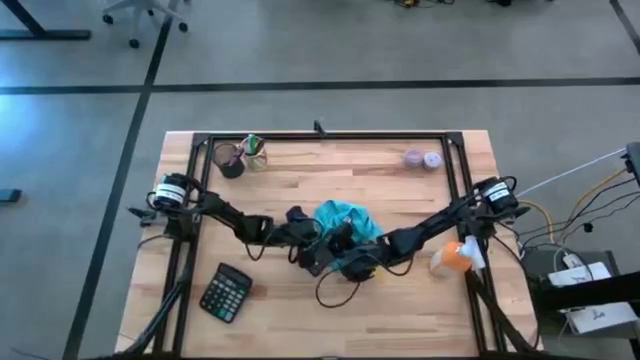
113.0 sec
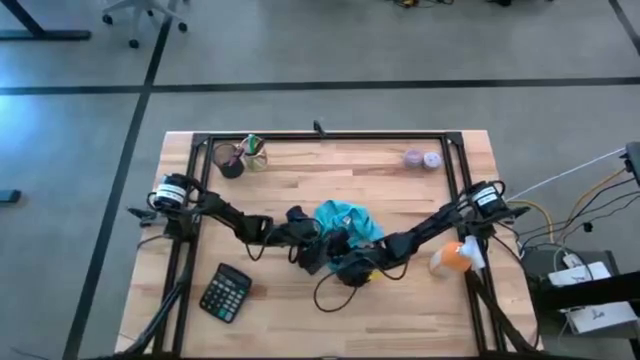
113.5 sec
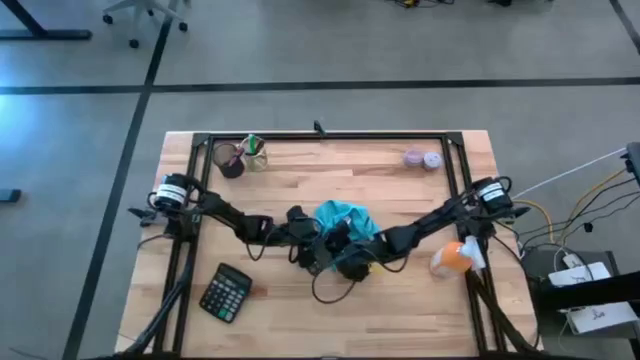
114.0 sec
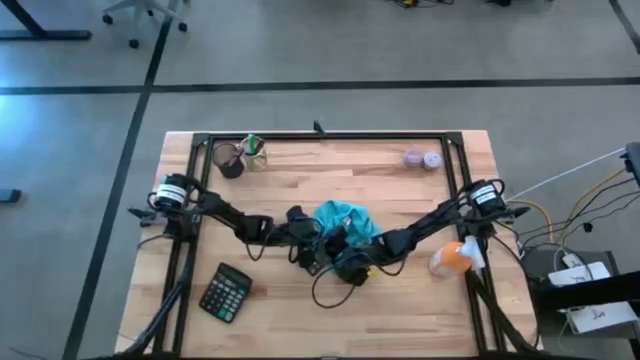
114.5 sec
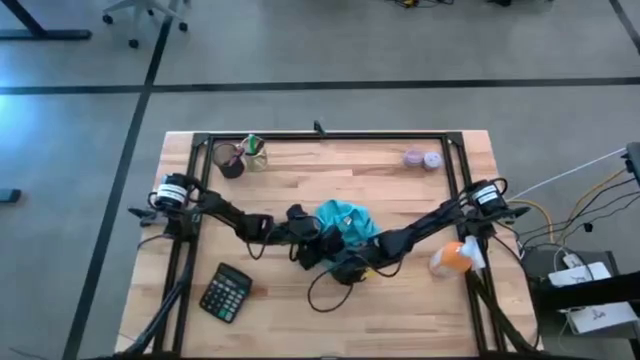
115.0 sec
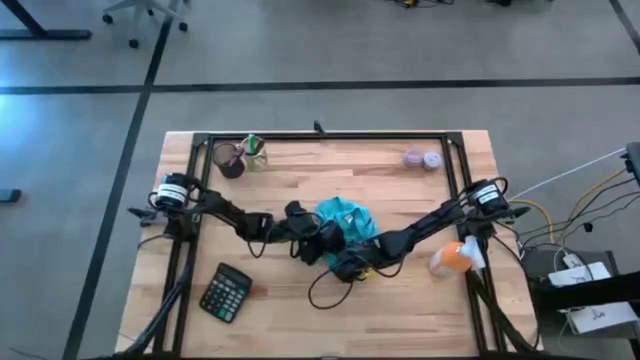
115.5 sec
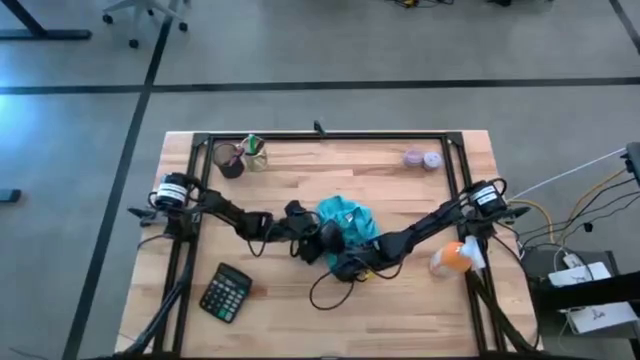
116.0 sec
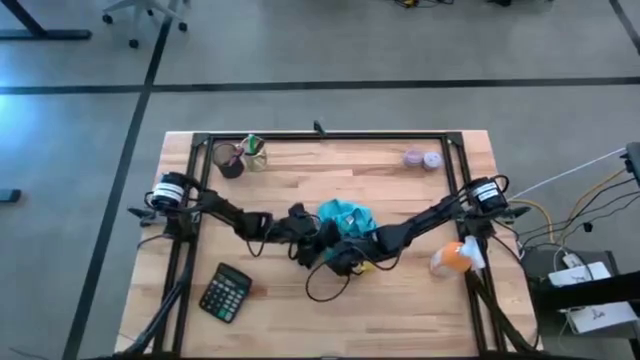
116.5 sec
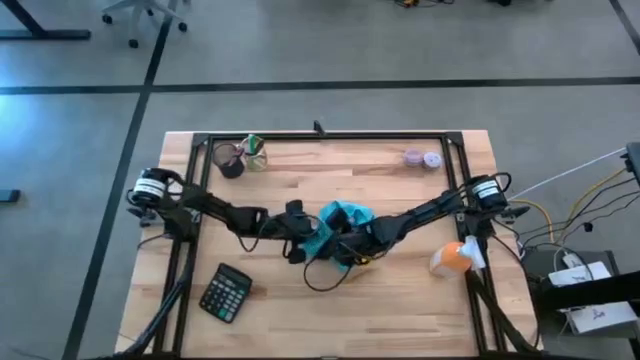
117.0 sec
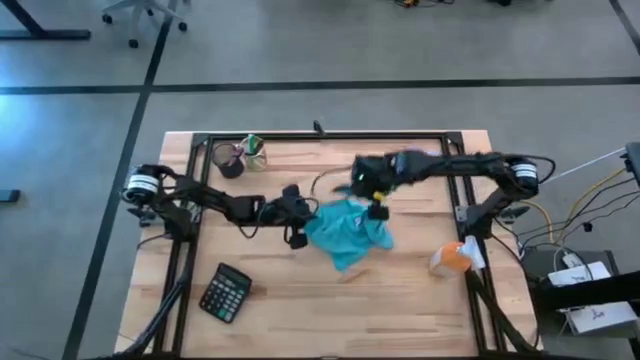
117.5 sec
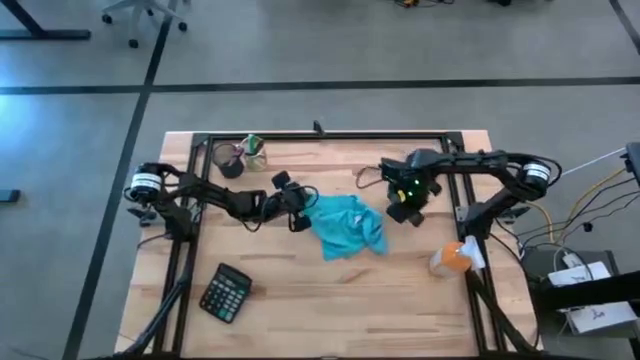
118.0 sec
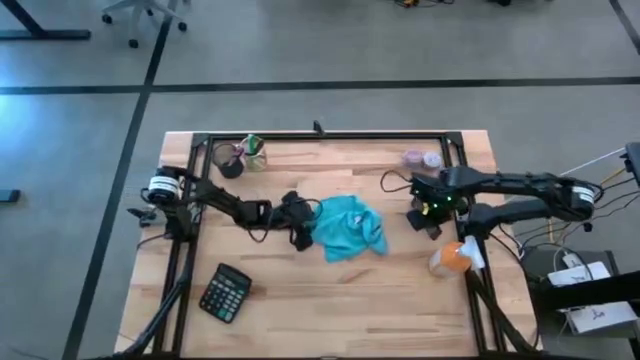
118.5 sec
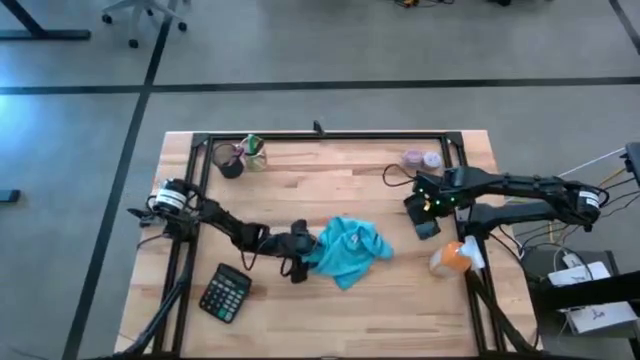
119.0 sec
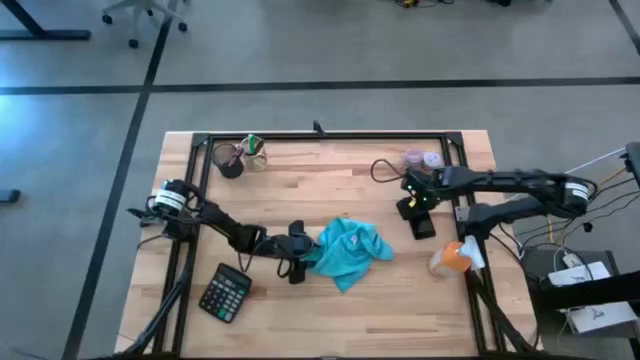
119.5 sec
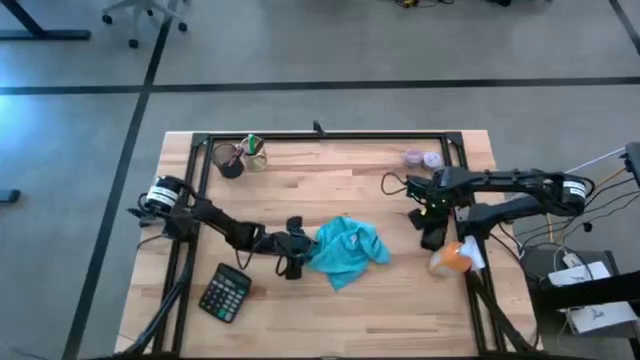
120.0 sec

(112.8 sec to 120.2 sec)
Task: Apply microfiber cloth
Move the cellphone on the middle right on the table

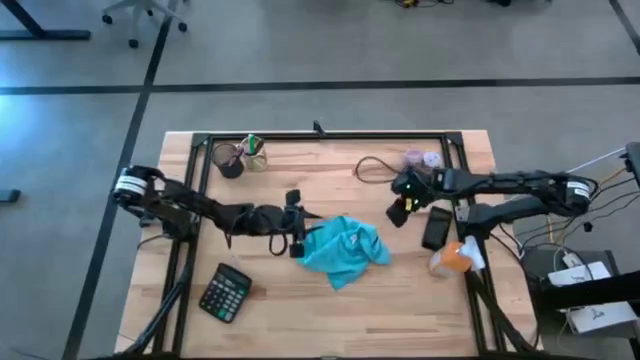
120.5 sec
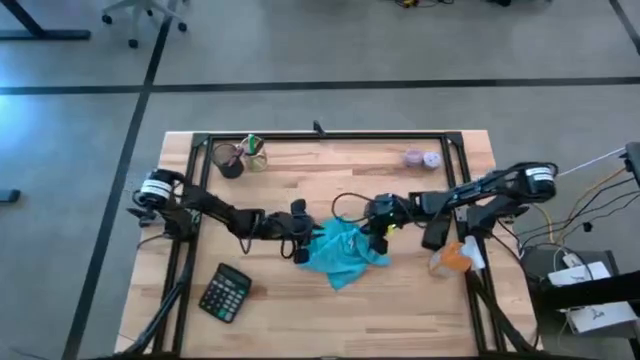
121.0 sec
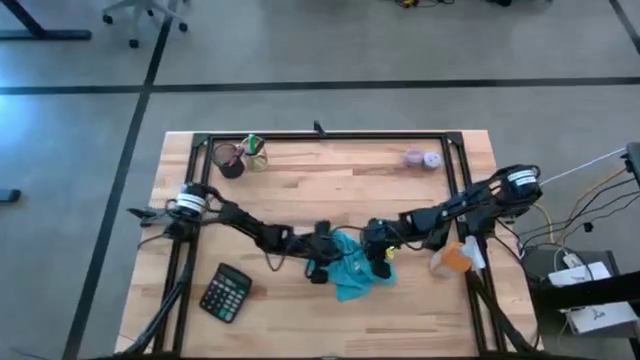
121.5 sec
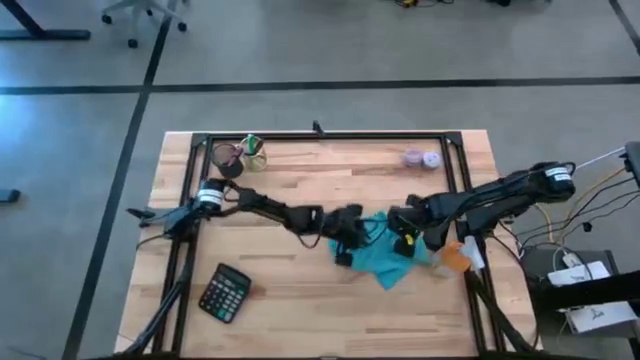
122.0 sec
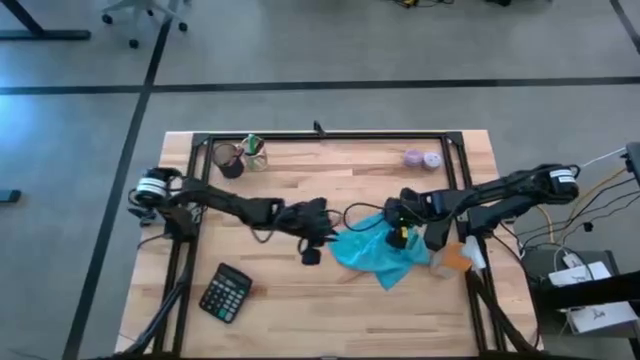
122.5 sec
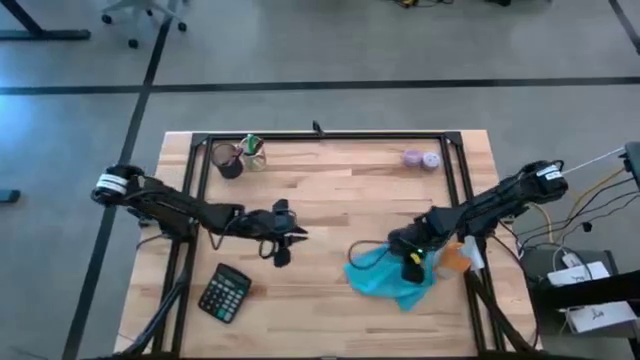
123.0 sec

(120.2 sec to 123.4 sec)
Move the microfiber towel to the middle right of the table

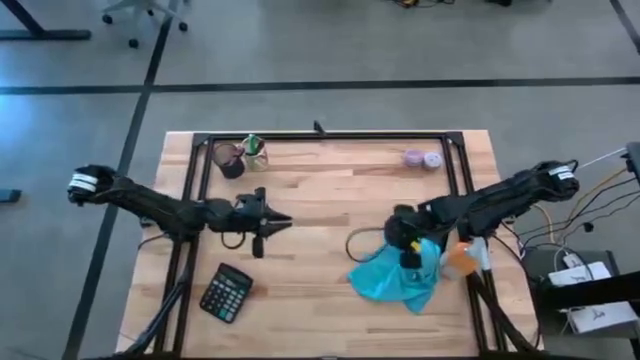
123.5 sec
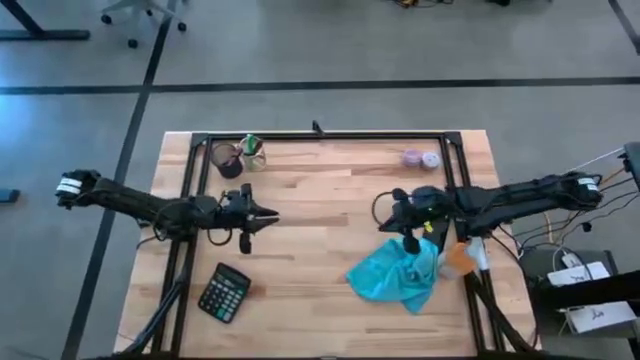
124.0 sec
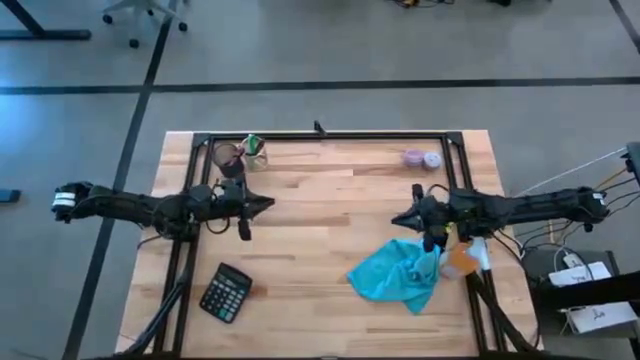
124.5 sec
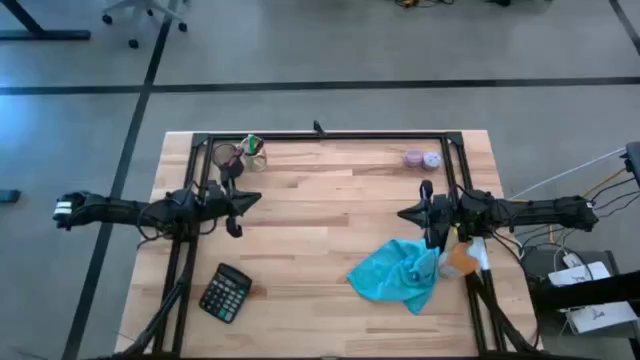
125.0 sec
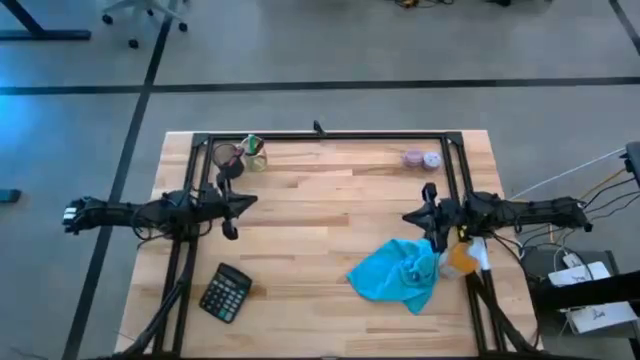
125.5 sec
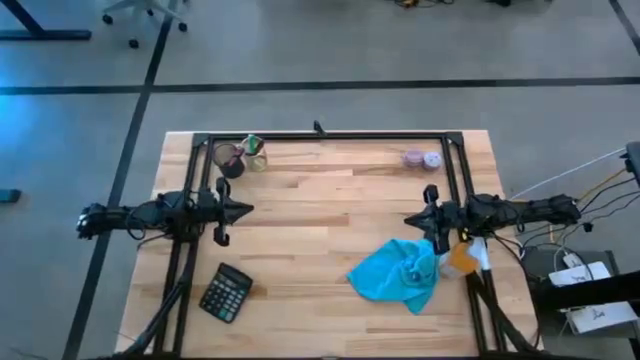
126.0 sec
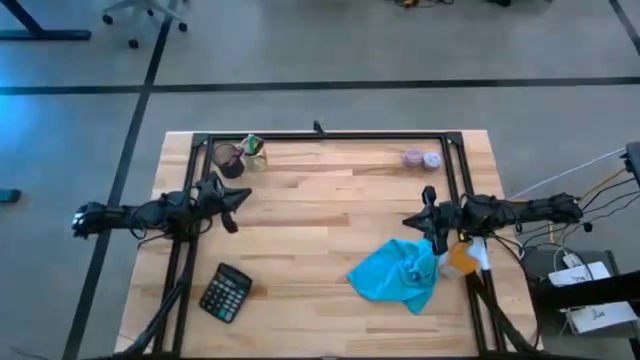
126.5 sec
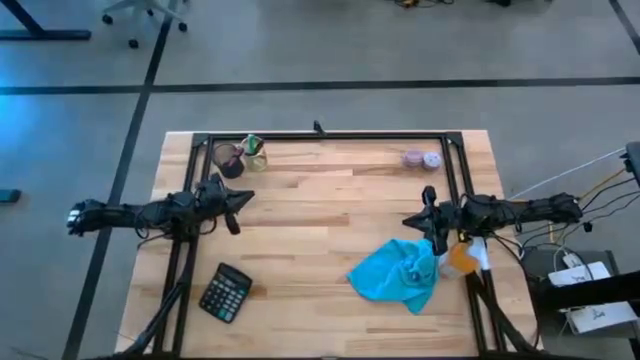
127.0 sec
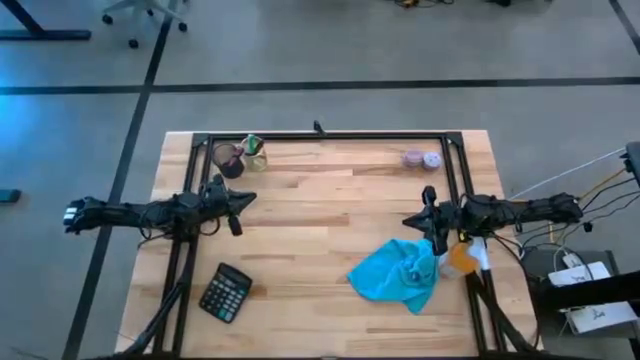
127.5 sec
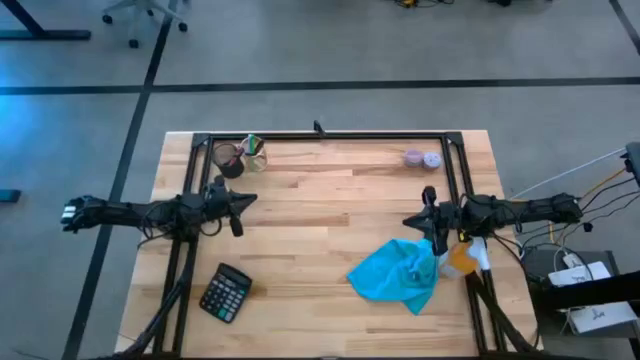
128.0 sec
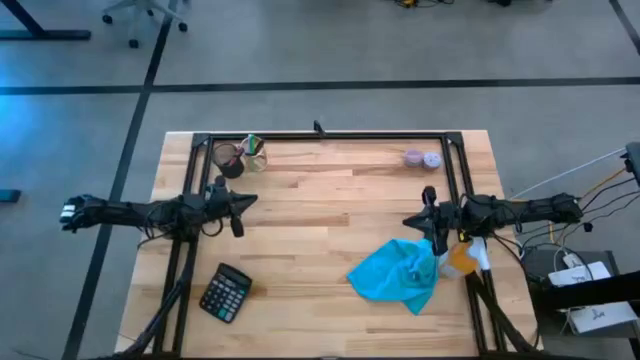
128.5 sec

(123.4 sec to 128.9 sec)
Return to Home Position

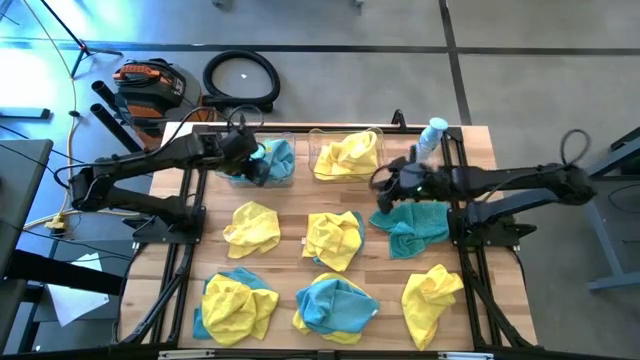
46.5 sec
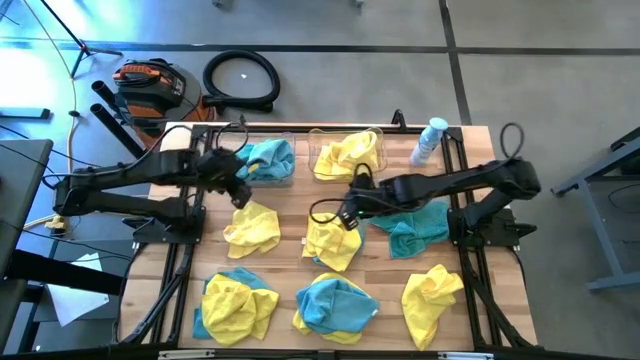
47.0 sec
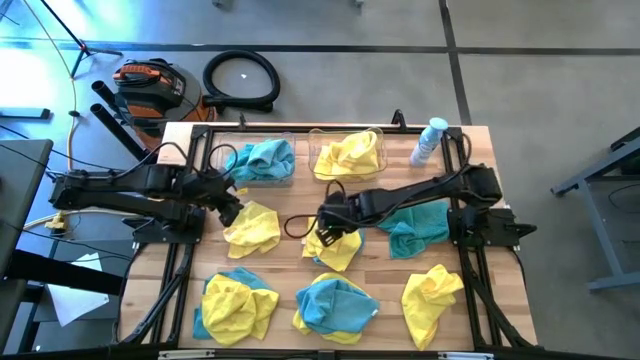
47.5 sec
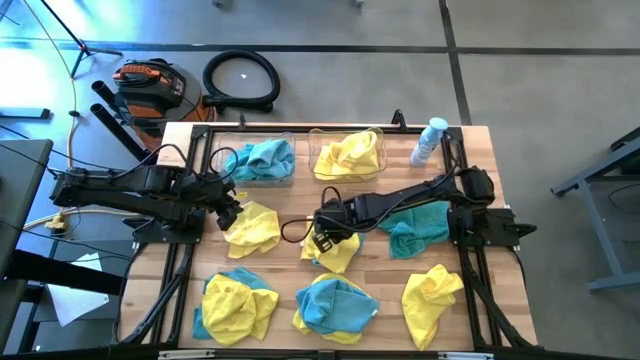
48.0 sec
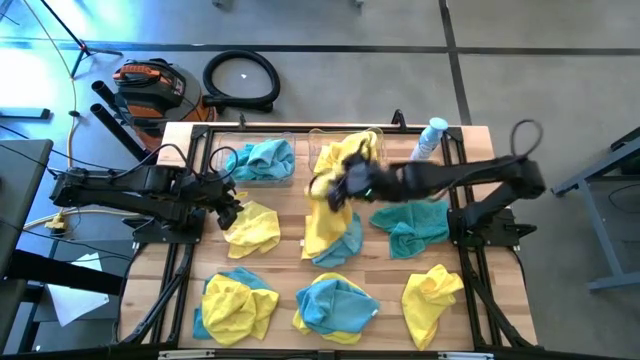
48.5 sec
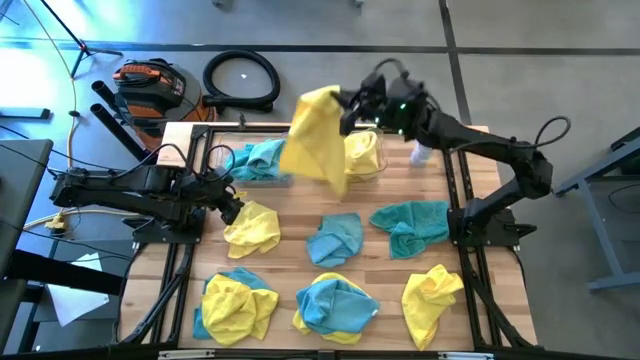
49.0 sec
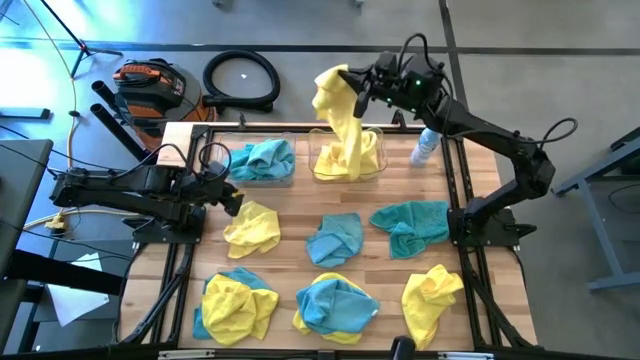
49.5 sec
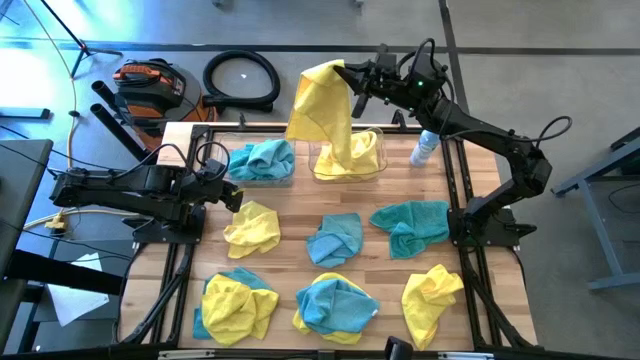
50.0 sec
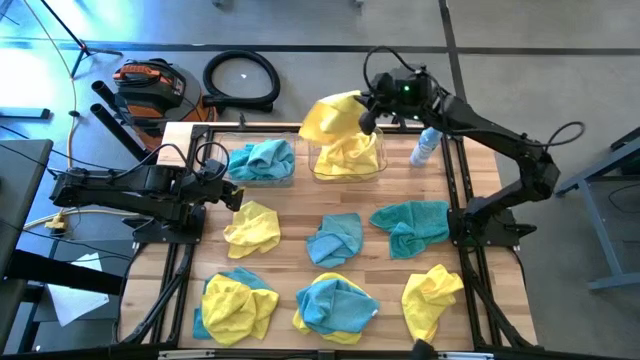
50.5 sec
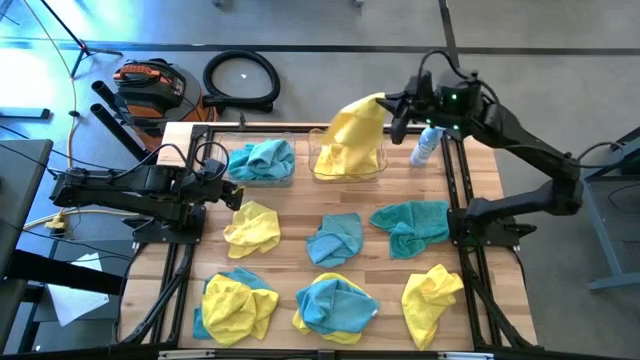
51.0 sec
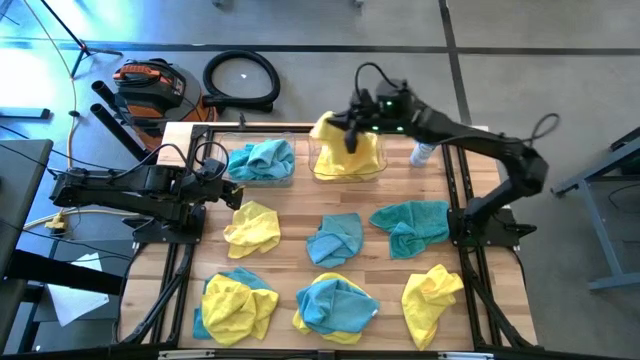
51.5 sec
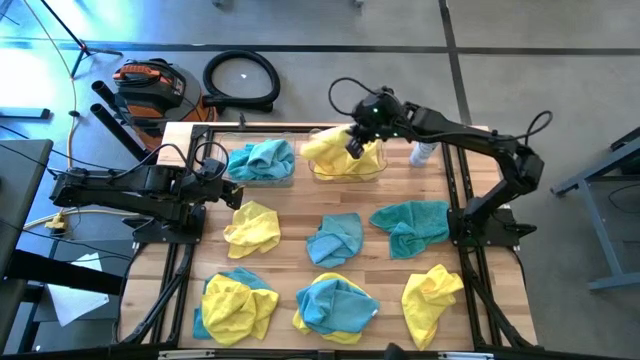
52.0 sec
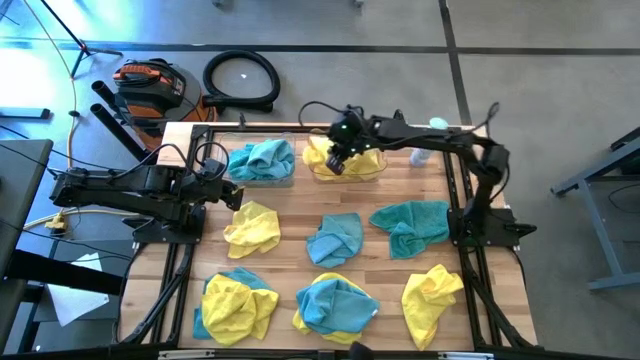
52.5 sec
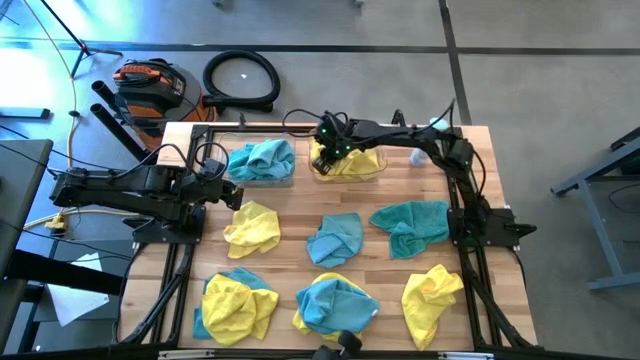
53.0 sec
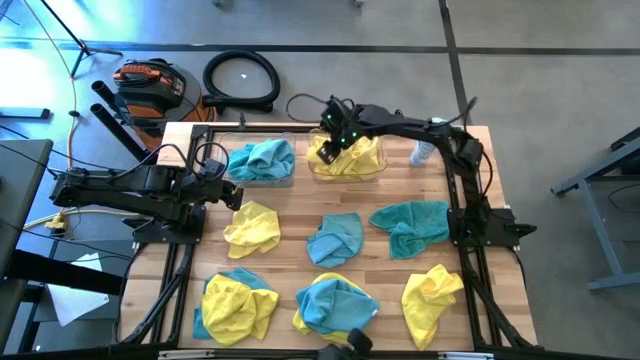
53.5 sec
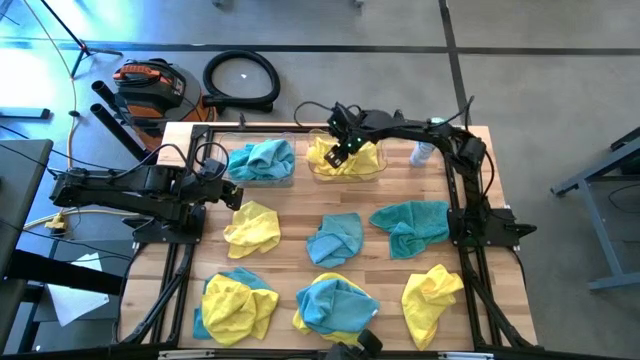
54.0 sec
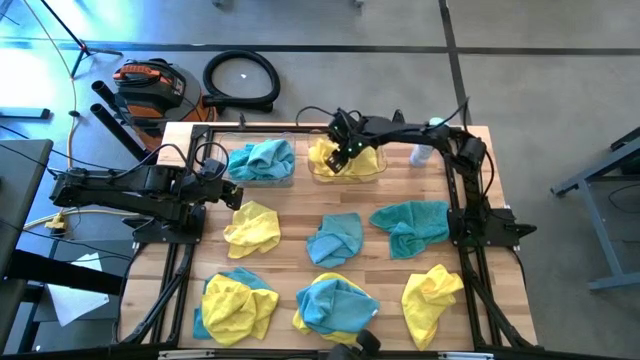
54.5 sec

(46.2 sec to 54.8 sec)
Task: Sort microfiber towel by color & place in baskets
Put the yellow towel into the right transparent bin
